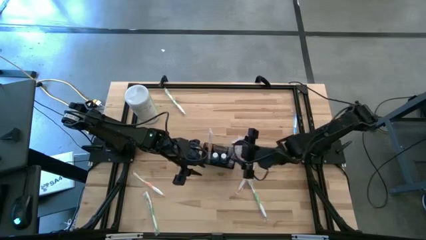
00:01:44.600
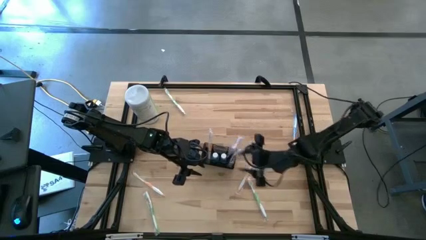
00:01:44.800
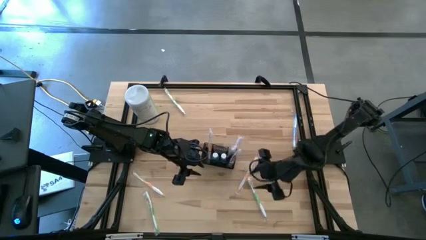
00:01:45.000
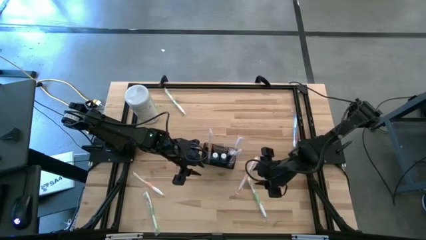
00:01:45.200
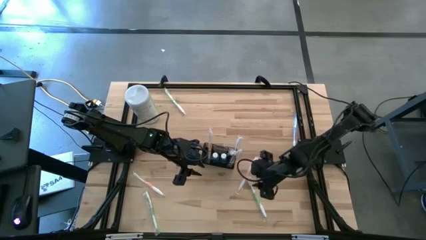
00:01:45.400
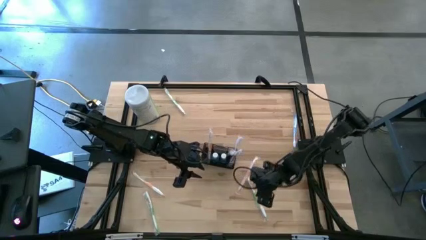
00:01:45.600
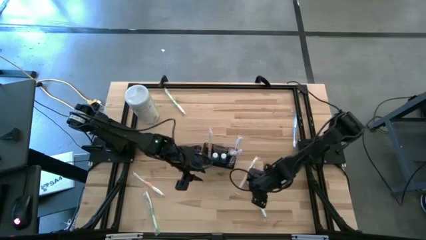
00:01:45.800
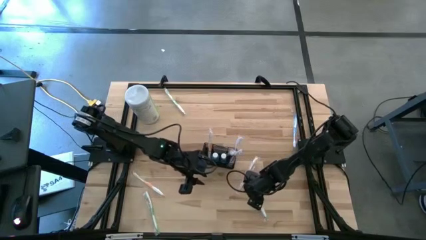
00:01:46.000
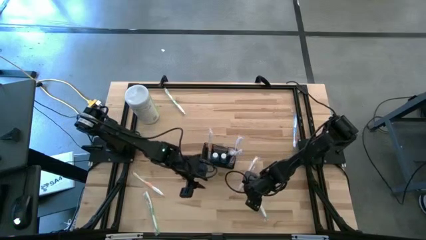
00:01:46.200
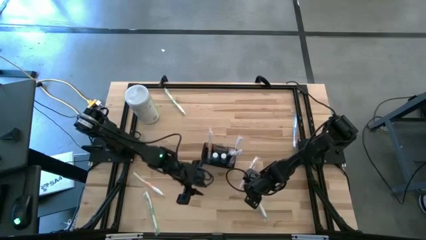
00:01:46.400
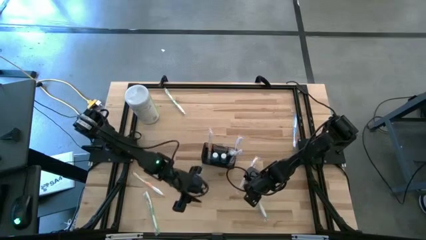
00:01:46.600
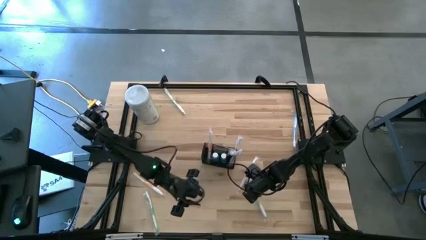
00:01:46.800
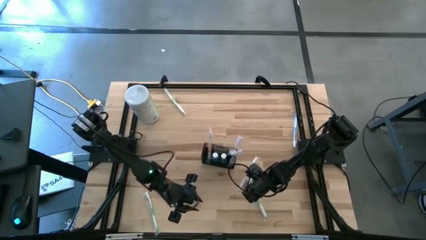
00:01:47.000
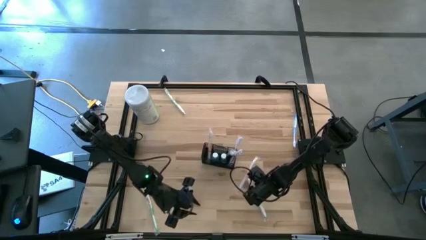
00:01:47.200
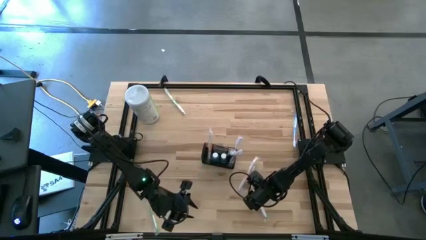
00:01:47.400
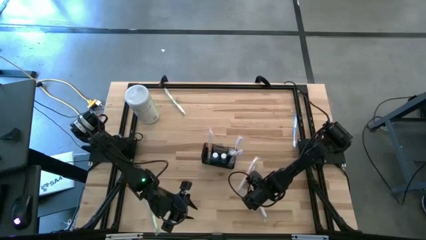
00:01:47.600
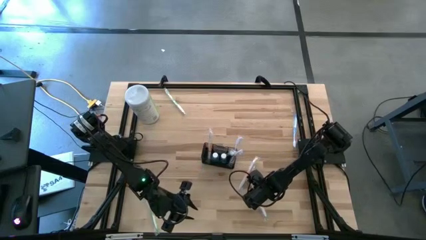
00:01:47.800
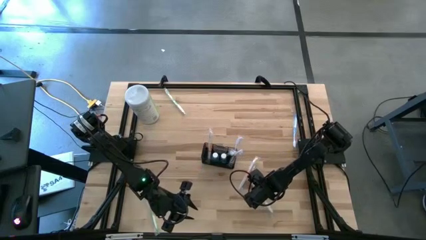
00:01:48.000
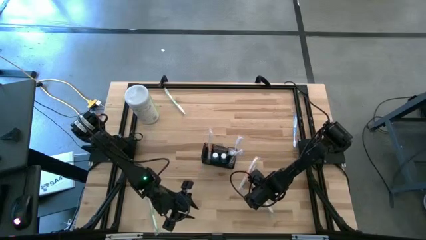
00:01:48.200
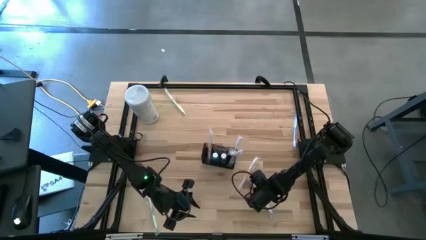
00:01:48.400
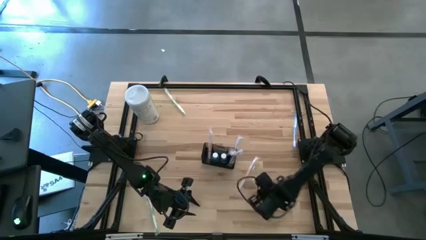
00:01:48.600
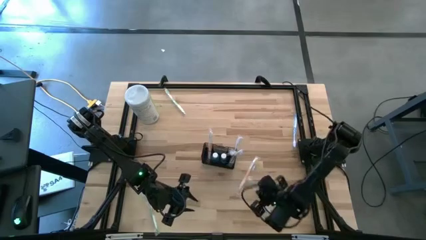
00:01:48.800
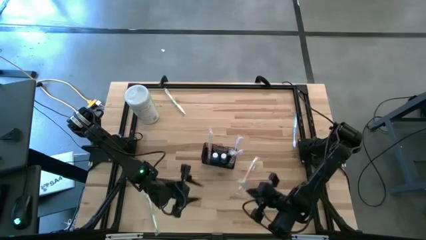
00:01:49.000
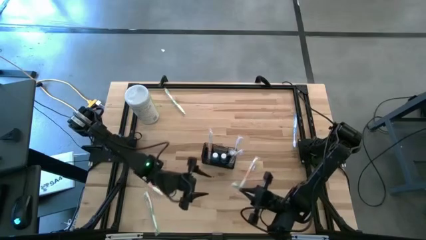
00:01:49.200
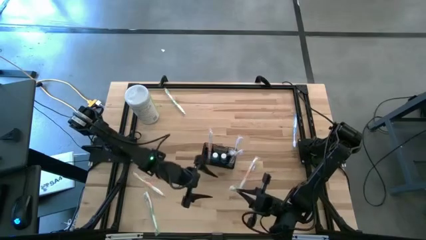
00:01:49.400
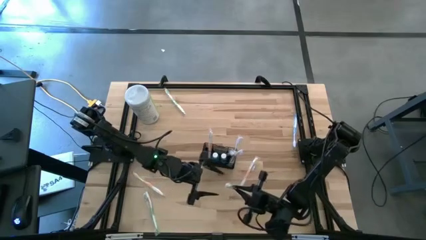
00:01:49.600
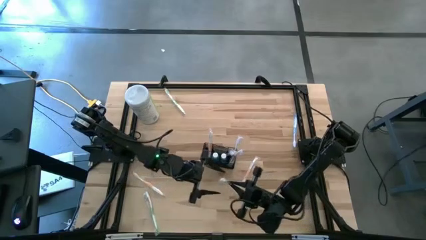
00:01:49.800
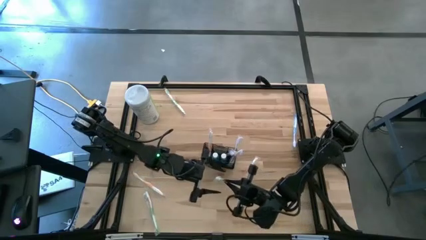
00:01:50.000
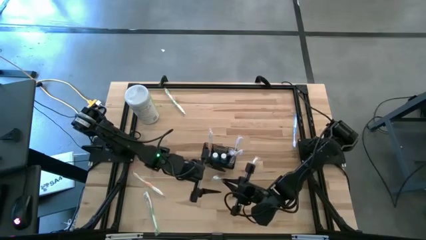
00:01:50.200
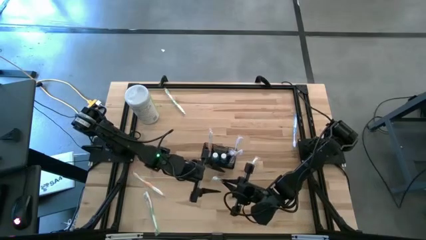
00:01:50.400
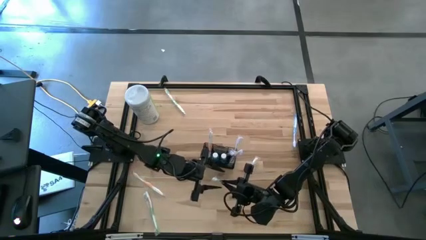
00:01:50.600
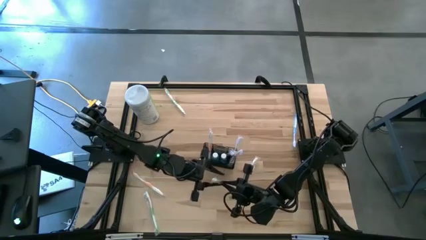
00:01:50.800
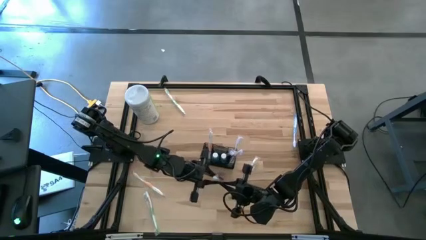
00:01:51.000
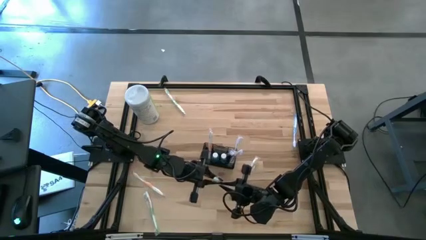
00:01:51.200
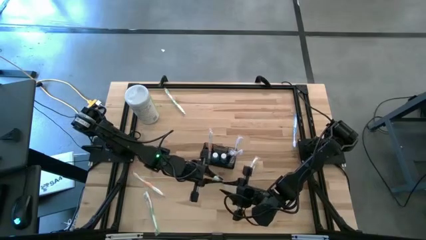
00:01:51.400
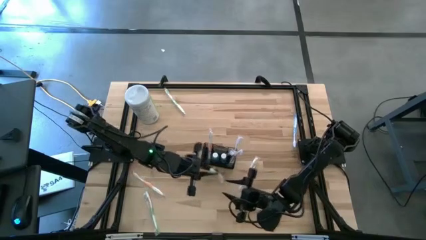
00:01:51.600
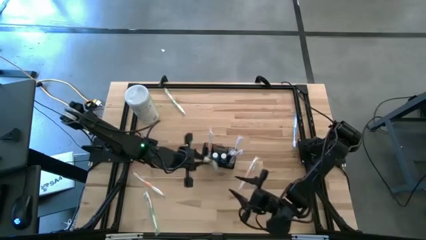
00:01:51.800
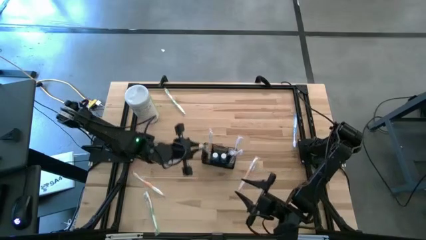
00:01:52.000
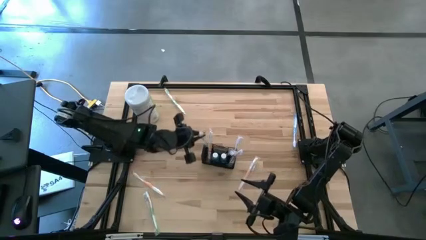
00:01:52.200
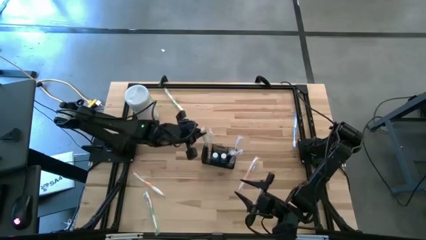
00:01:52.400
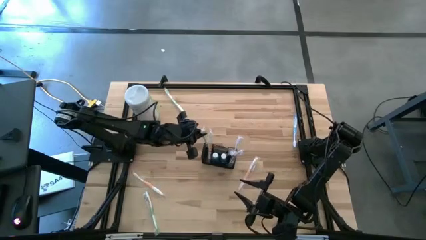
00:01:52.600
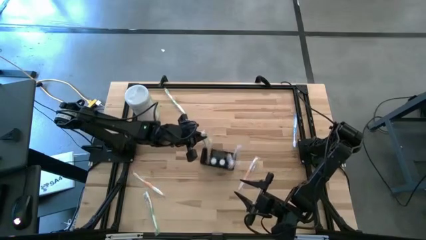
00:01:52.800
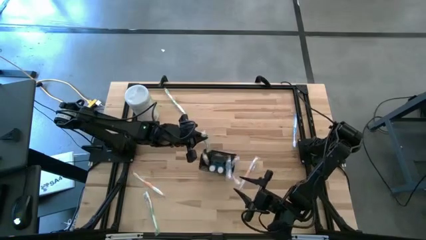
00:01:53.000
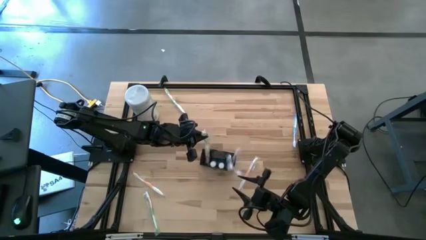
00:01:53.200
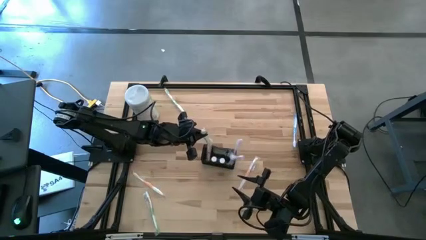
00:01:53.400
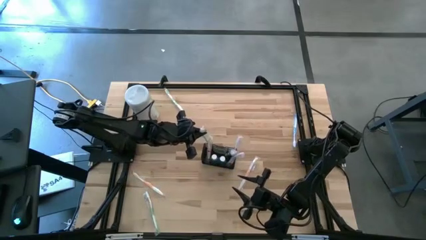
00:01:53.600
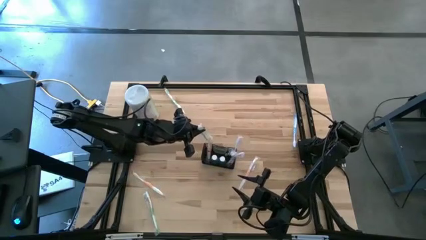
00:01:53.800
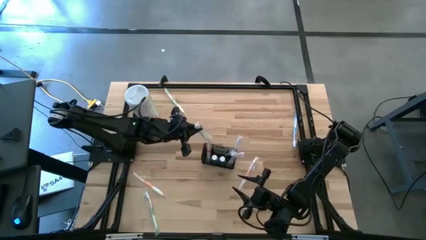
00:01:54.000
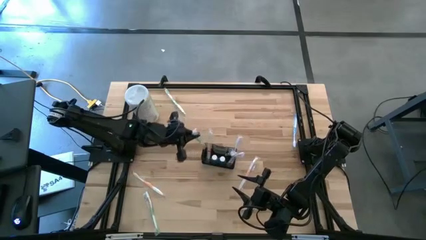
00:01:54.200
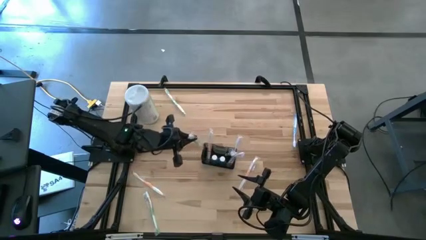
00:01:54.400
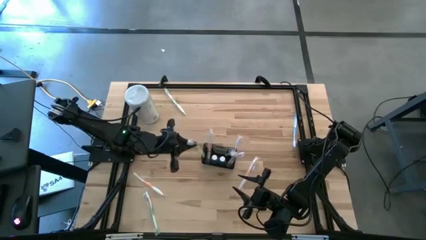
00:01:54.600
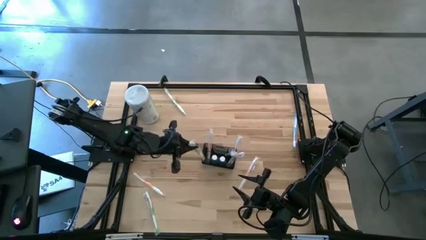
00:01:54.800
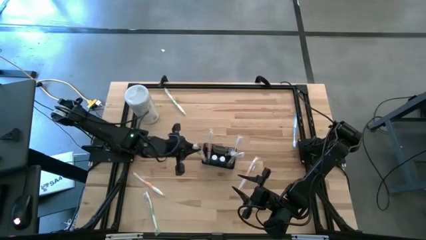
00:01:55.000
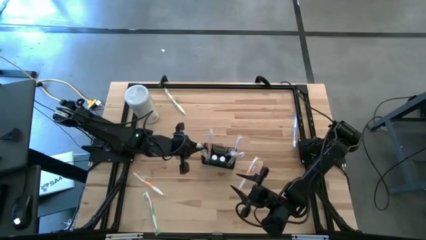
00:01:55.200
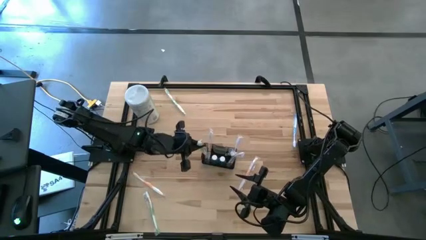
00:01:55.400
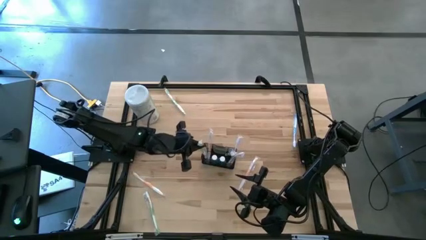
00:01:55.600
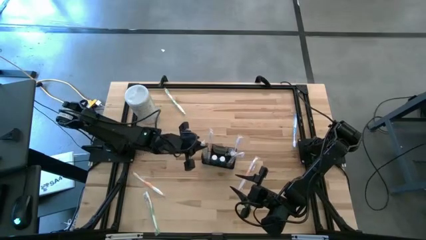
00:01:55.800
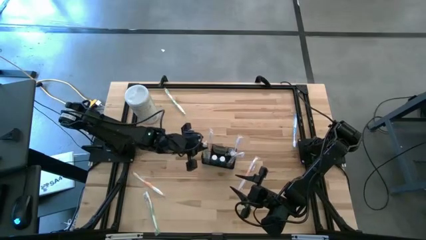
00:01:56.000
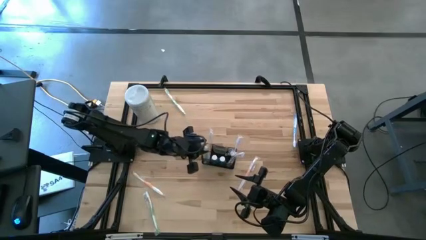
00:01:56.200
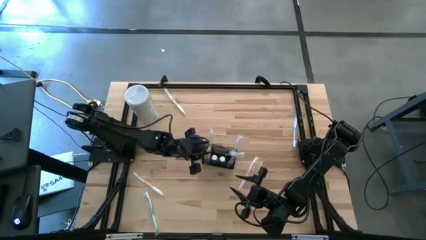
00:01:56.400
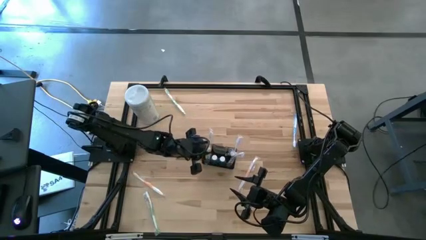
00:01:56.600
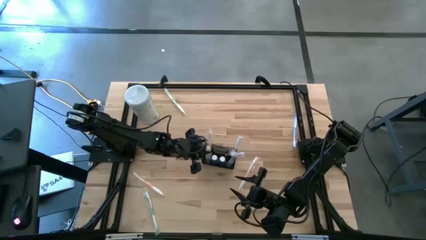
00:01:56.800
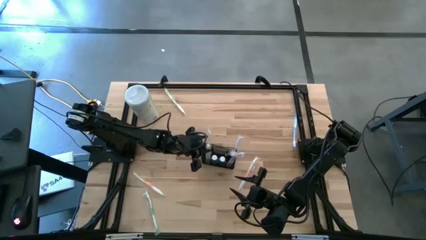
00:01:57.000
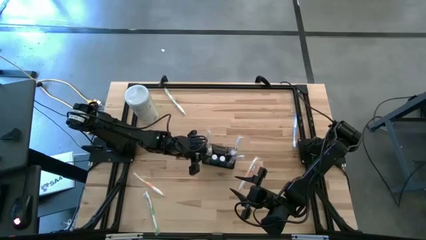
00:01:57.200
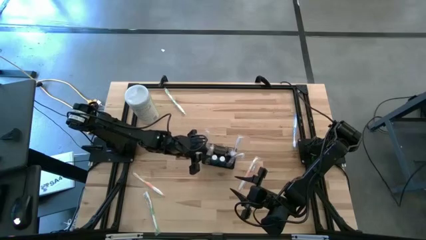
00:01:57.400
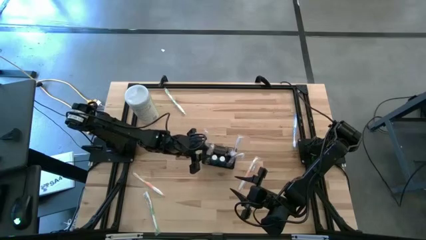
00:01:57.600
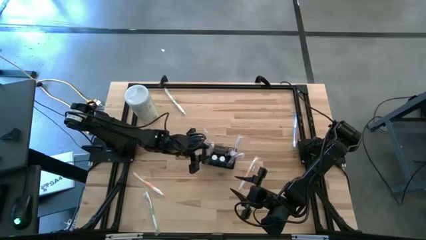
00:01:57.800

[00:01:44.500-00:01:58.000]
Task: Pick & Place toothbrushing station
Put the bottom right green toothbrush into the mesh organizer
